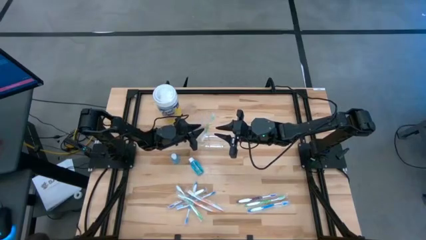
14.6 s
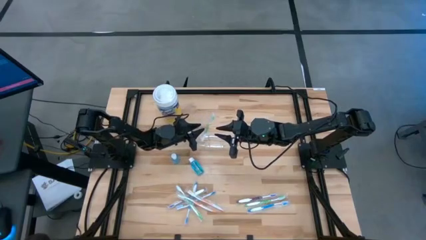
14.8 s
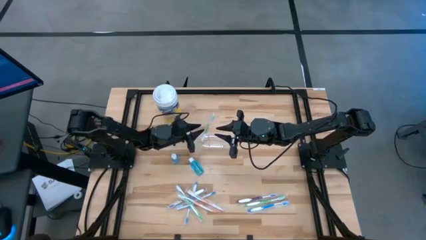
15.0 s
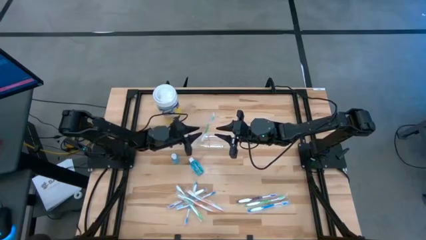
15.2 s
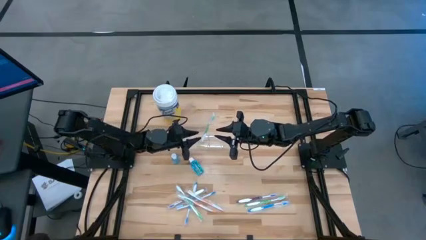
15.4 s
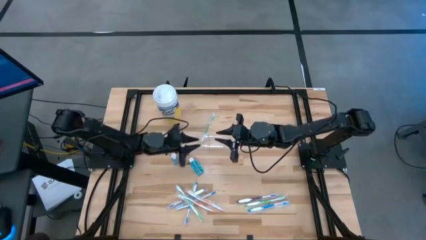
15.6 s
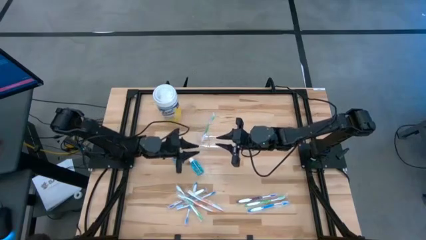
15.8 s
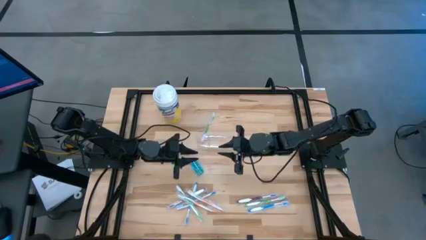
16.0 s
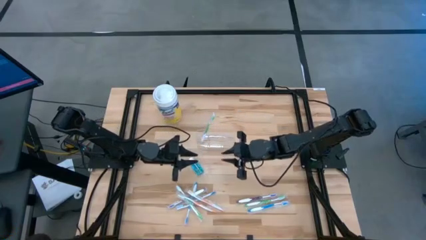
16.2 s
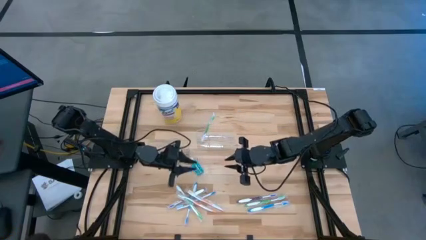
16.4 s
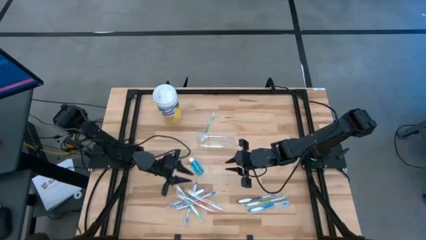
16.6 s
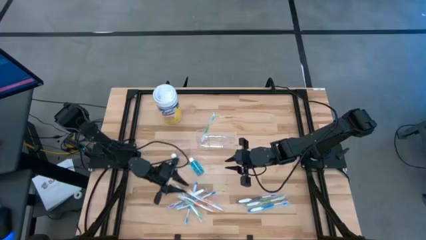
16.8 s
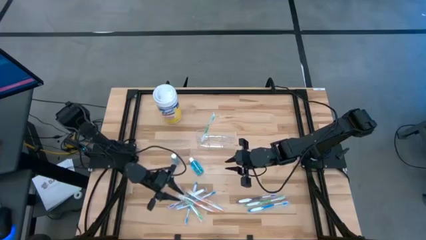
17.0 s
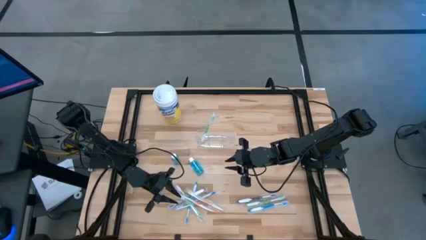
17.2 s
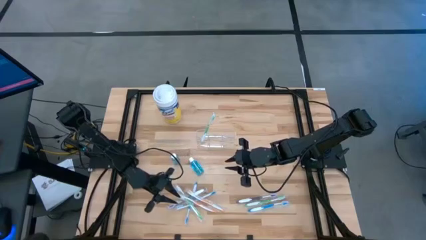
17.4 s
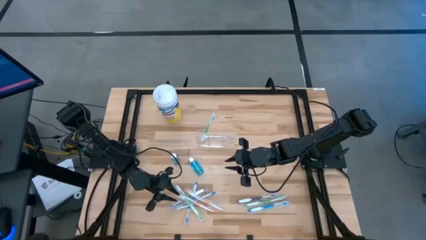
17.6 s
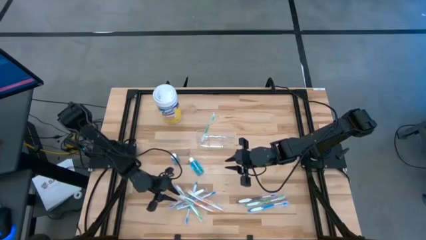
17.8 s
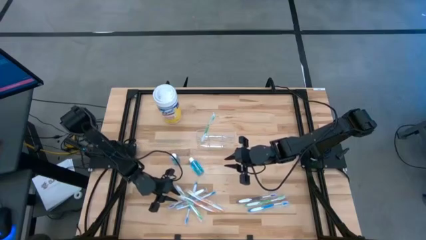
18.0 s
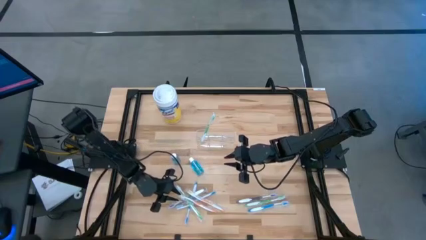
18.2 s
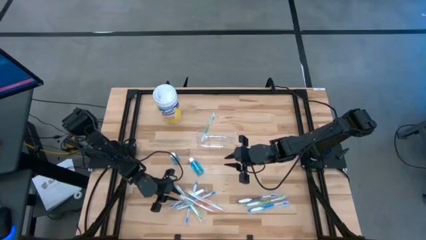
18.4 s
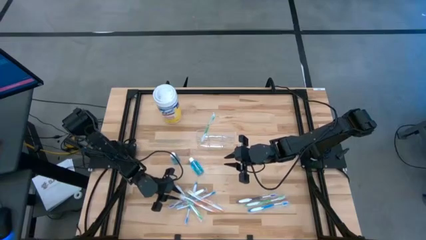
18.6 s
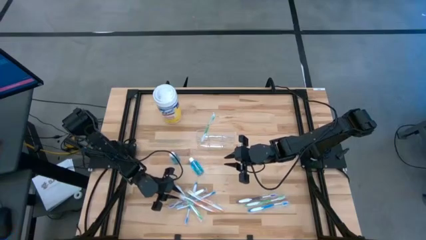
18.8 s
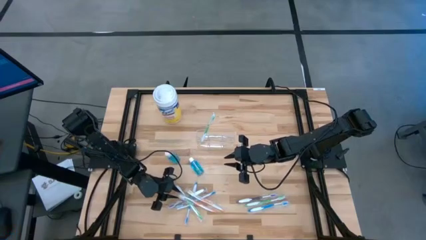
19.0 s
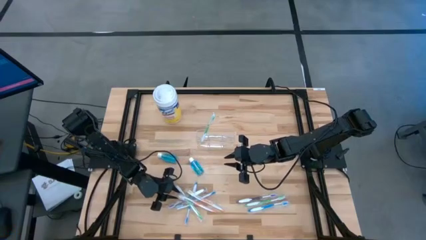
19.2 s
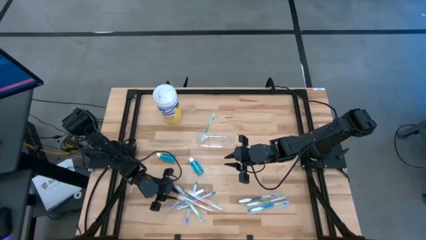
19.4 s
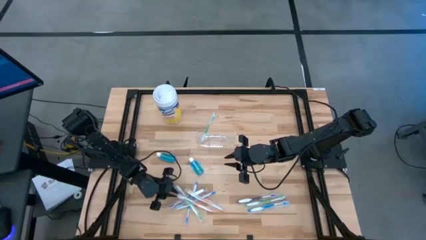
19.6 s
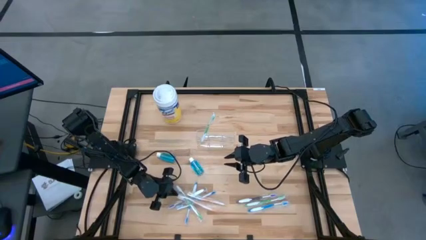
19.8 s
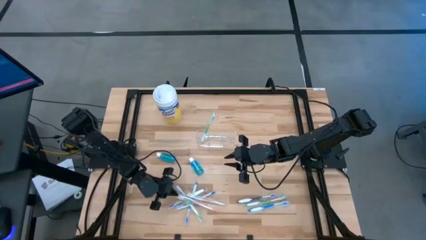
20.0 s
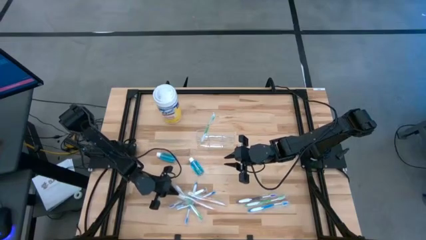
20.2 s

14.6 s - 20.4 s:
Task: Pick & Place toothbrushing station
Put the left orange toothbrush into the transparent organizer

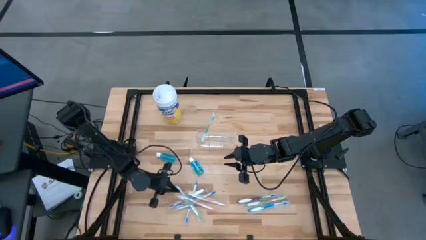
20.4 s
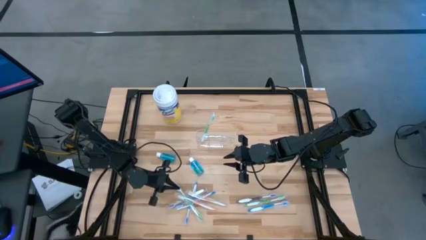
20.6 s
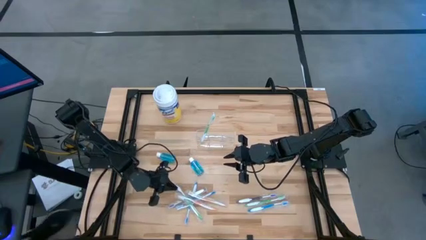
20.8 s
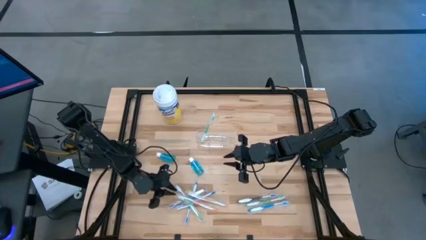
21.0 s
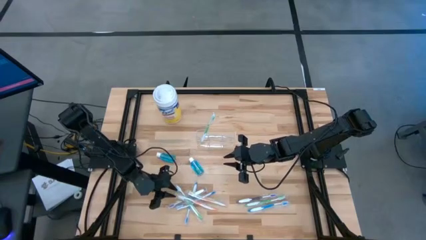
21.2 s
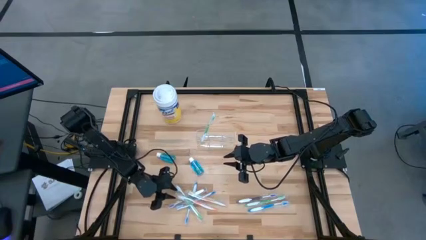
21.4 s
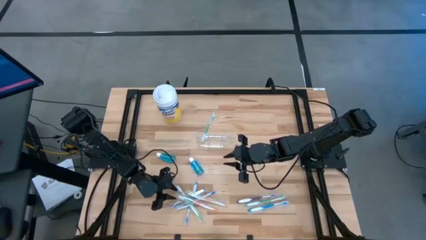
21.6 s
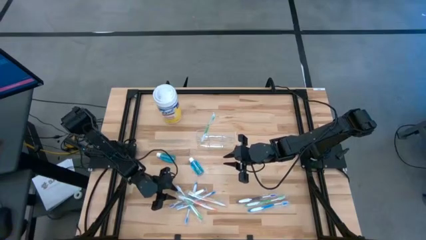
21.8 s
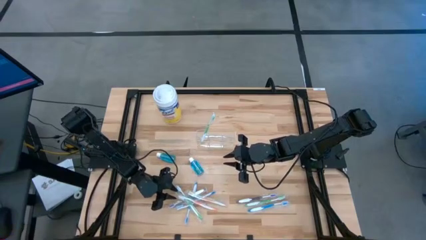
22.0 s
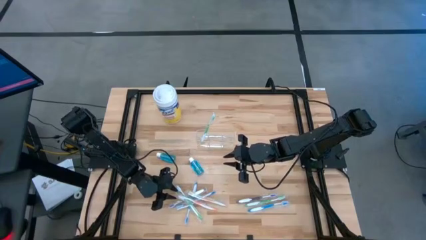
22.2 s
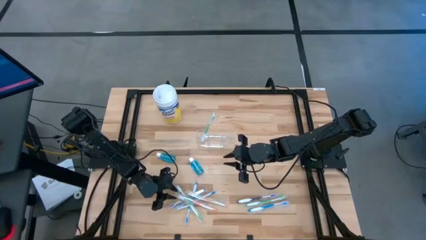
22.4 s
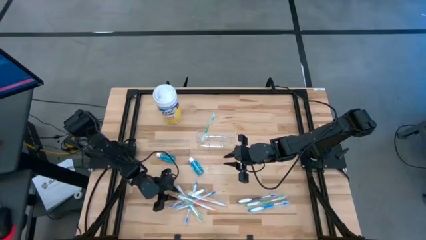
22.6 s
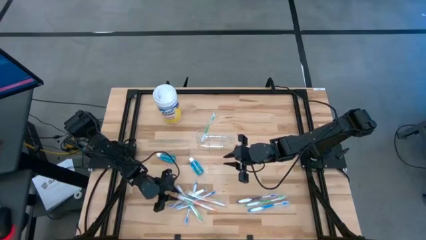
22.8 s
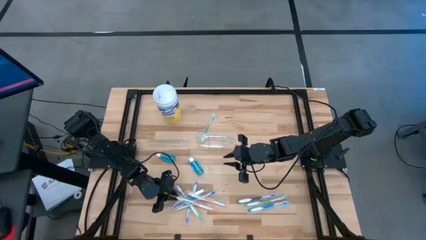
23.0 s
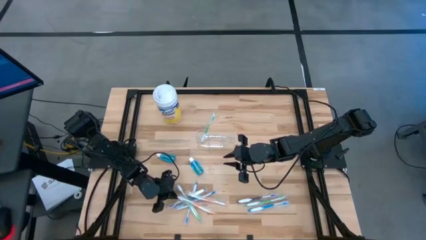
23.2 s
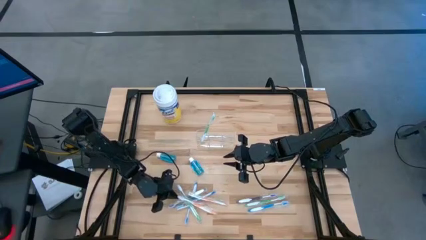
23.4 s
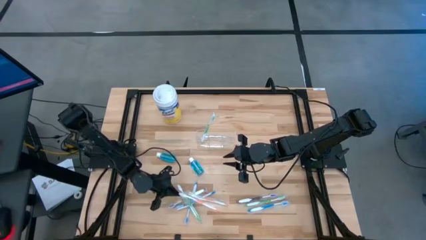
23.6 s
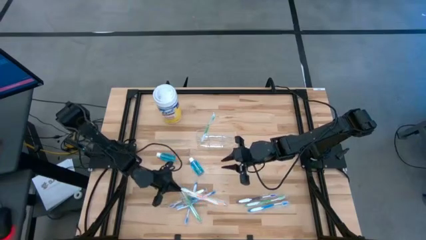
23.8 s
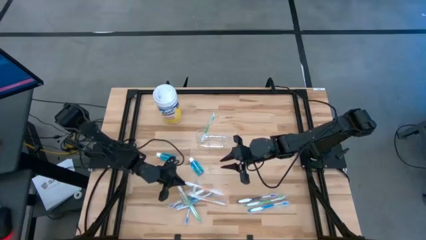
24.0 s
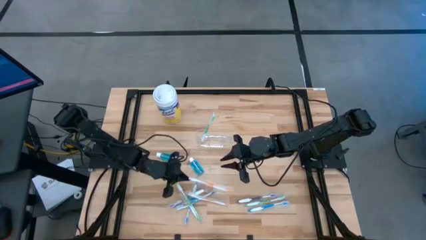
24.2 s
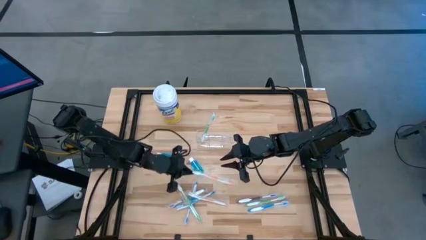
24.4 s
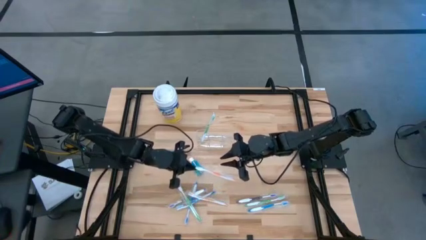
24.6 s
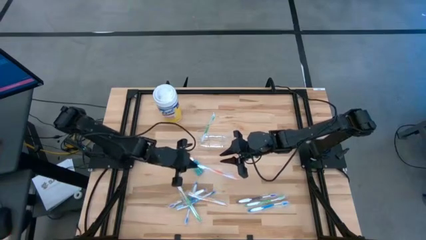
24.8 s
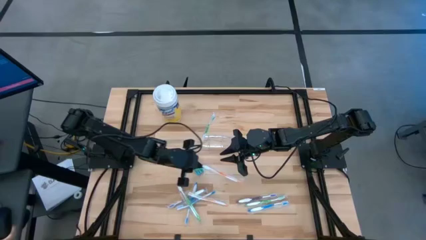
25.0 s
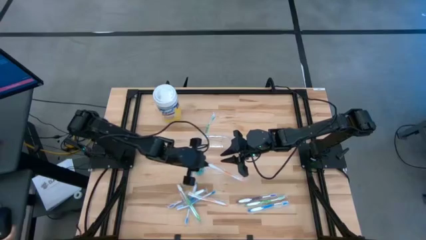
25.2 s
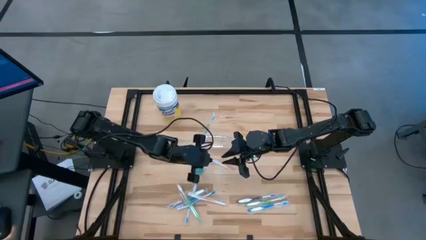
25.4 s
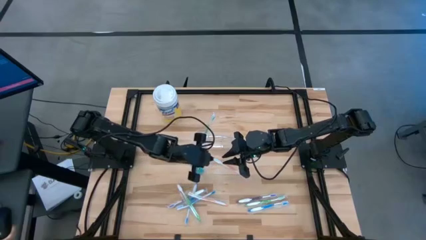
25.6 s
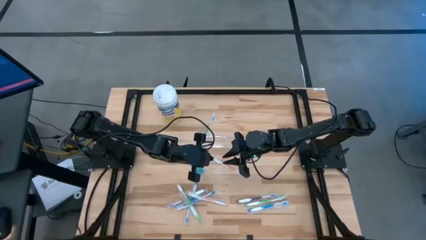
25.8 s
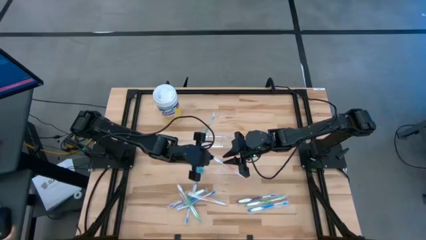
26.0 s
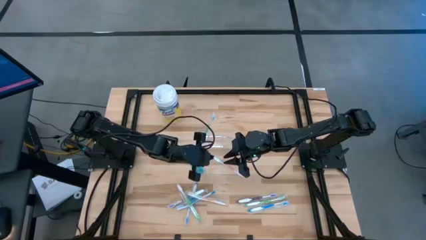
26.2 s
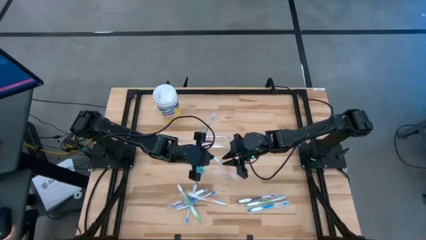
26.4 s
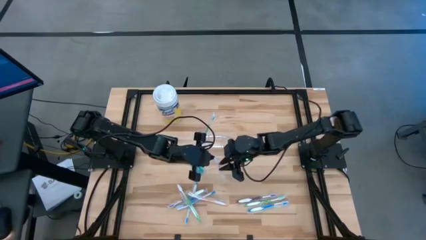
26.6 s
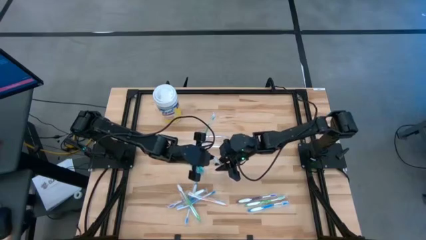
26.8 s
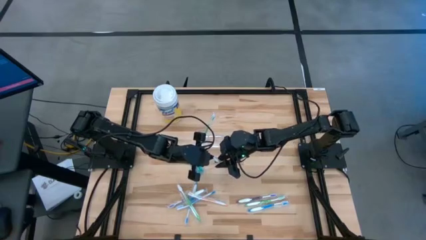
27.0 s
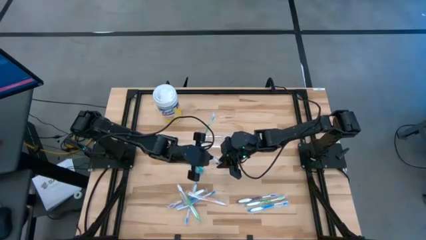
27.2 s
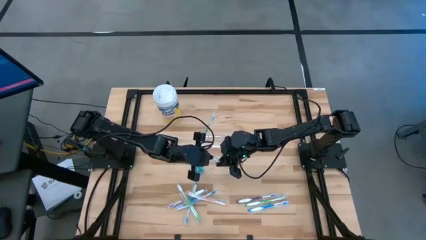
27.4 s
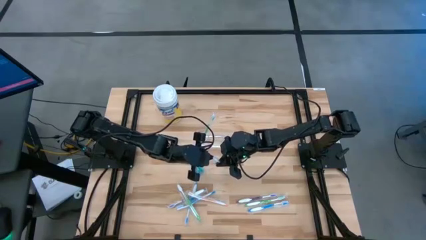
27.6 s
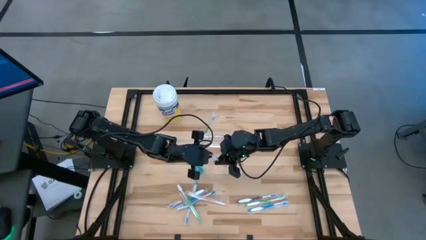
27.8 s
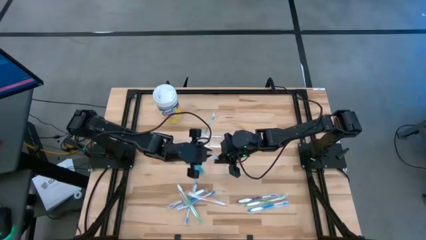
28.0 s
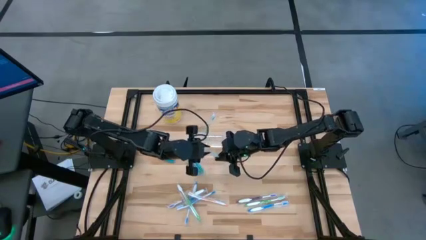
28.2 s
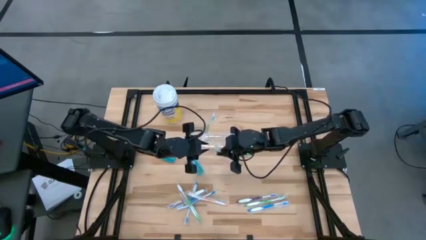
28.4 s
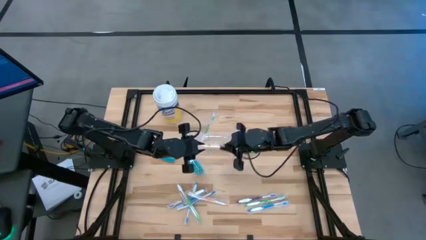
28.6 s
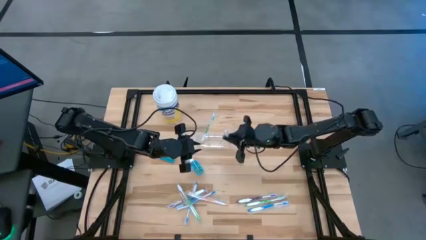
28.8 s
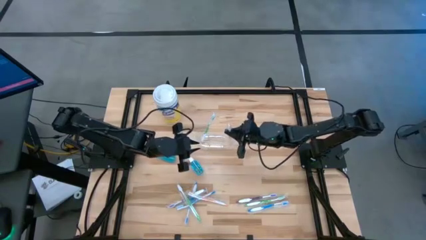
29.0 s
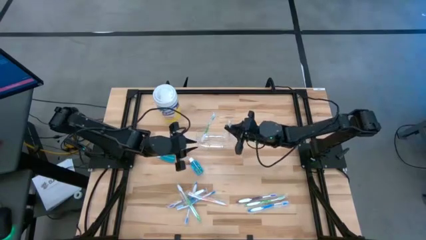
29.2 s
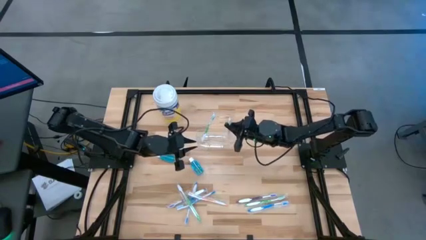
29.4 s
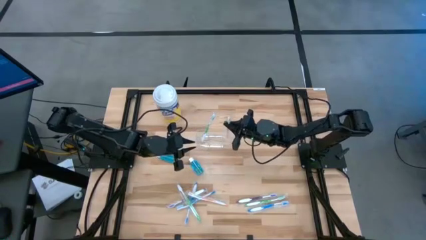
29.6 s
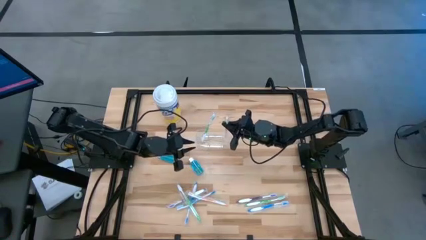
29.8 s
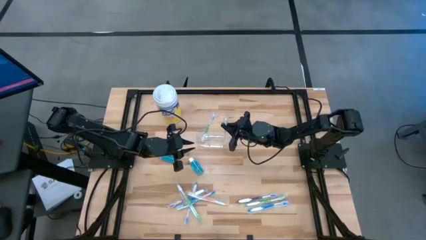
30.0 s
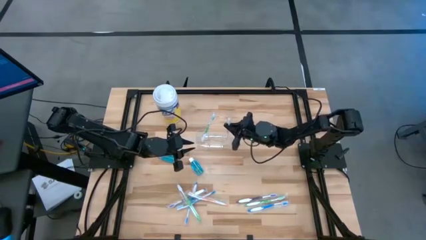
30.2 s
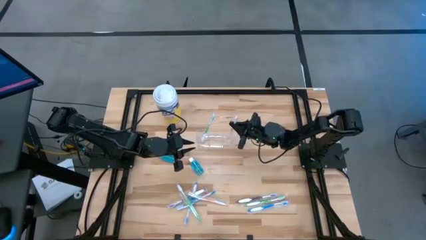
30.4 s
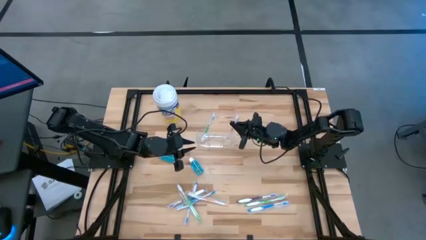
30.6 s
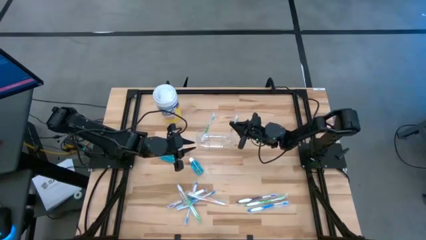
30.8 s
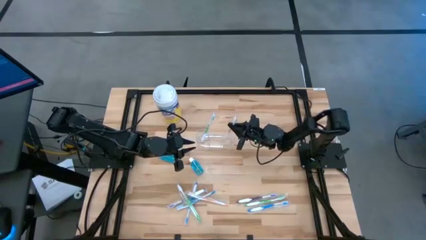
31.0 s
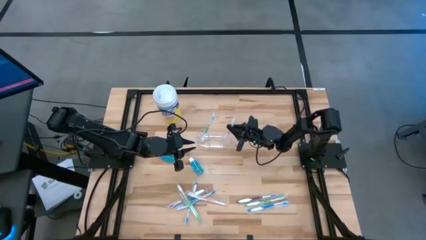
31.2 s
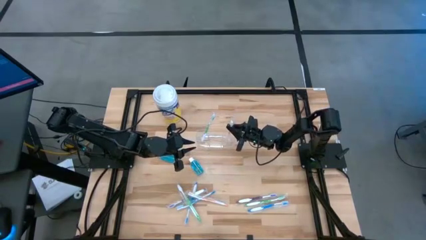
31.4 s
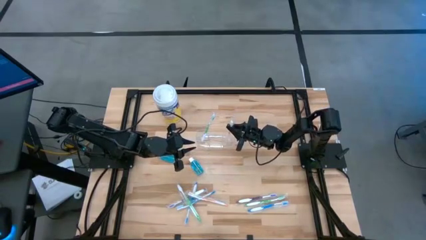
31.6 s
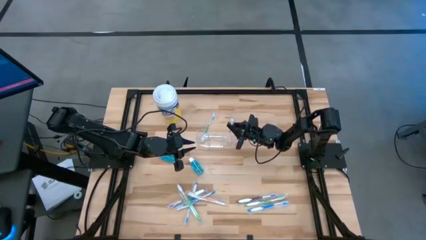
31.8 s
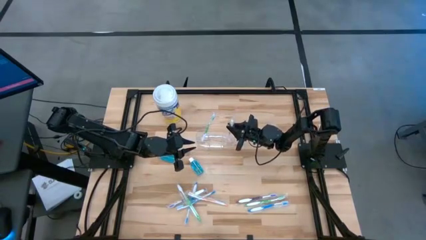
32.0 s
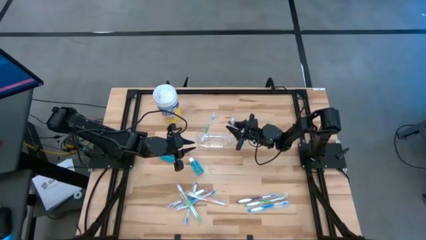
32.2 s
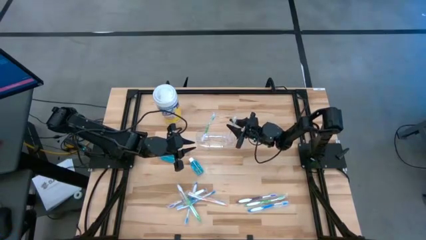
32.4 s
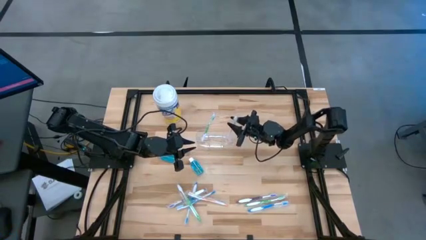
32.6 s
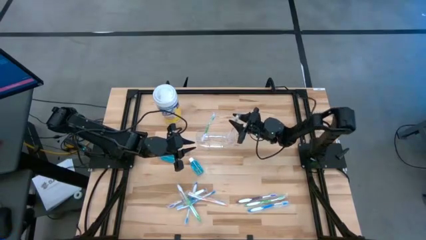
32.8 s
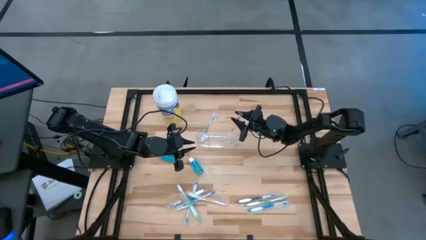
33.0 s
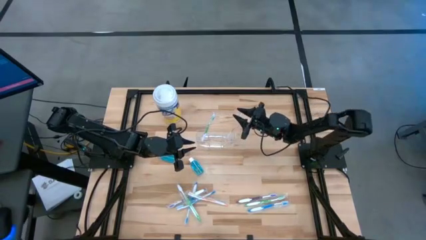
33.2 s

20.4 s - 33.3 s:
Put the left orange toothbrush into the transparent organizer
